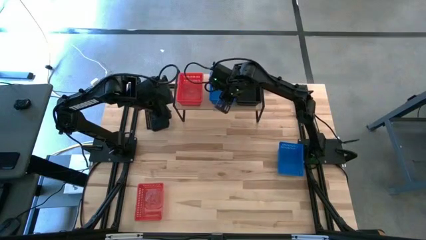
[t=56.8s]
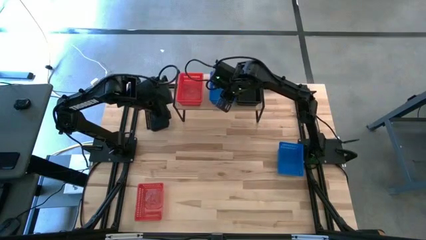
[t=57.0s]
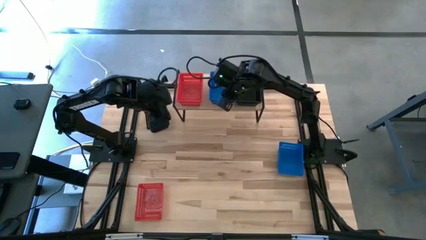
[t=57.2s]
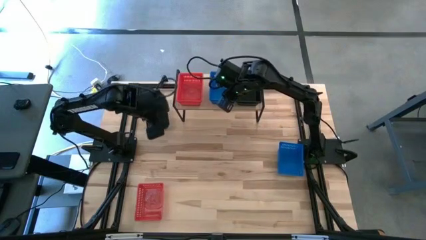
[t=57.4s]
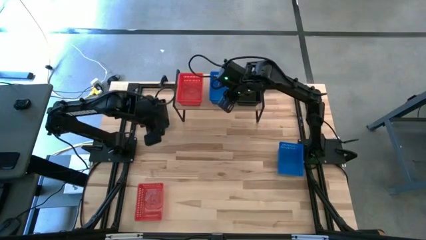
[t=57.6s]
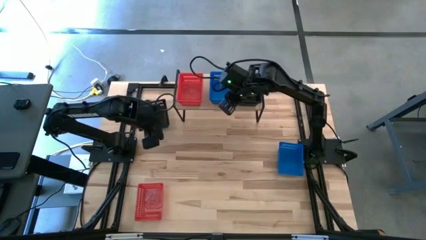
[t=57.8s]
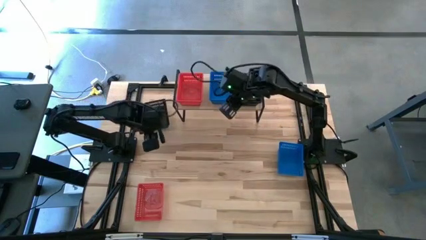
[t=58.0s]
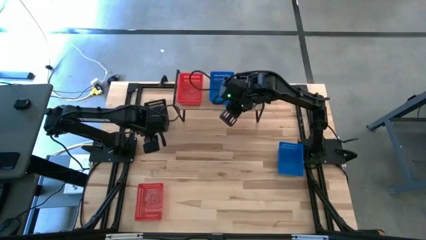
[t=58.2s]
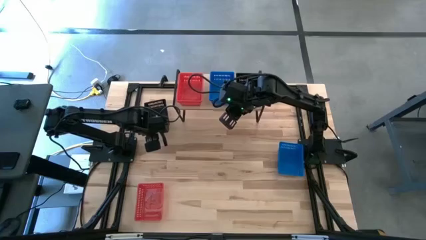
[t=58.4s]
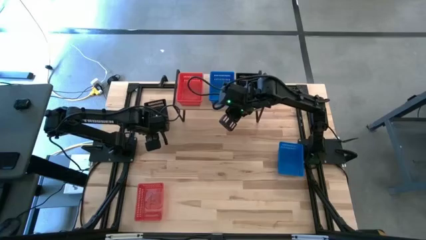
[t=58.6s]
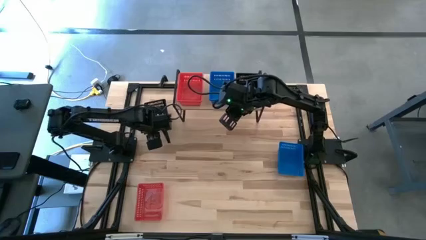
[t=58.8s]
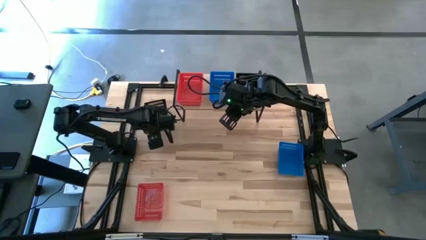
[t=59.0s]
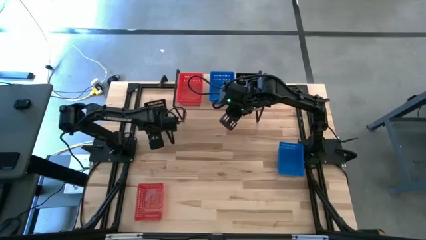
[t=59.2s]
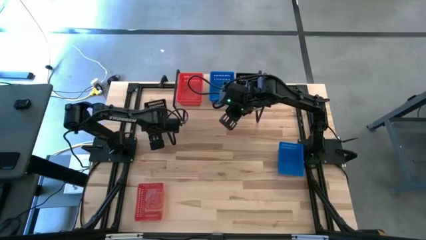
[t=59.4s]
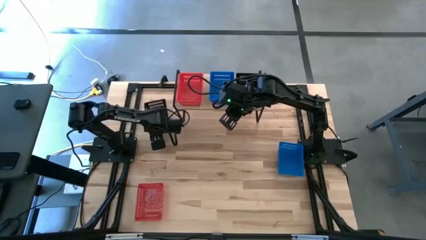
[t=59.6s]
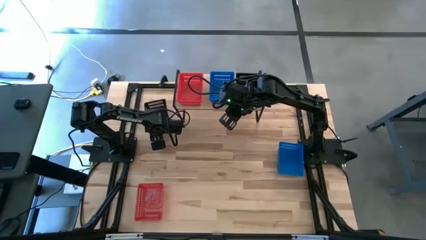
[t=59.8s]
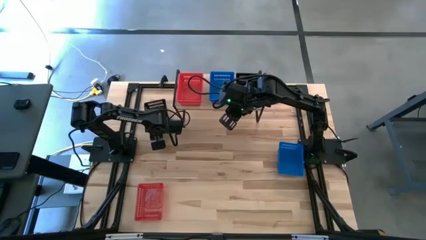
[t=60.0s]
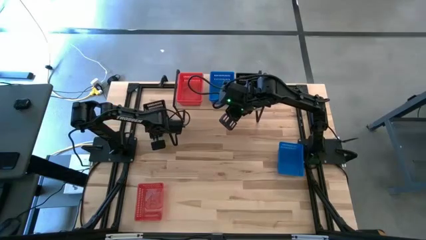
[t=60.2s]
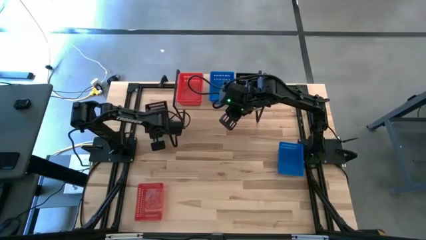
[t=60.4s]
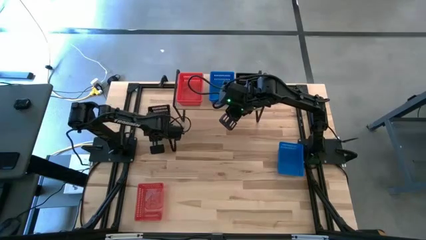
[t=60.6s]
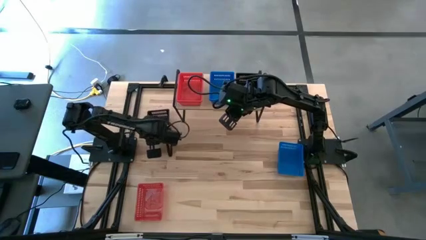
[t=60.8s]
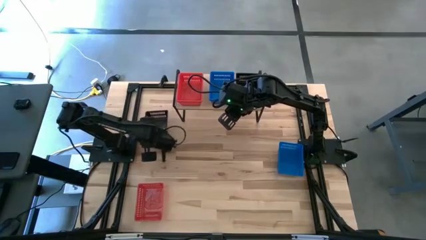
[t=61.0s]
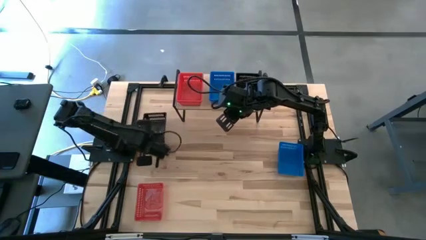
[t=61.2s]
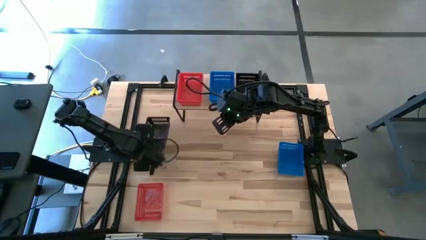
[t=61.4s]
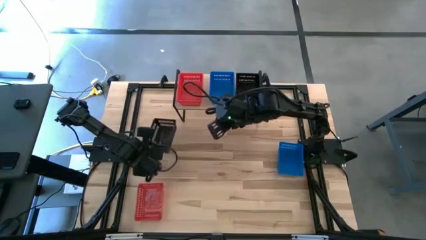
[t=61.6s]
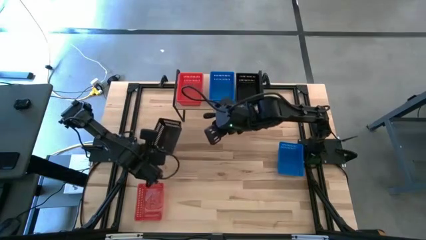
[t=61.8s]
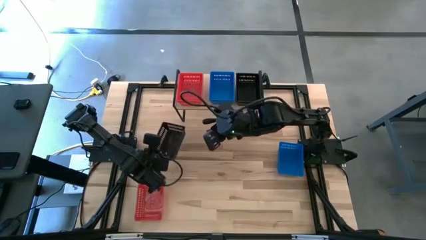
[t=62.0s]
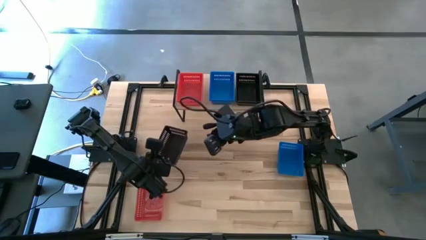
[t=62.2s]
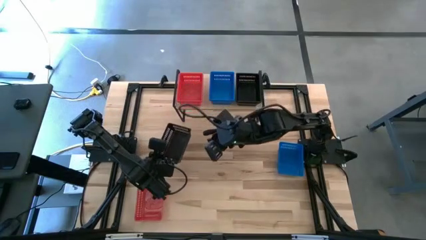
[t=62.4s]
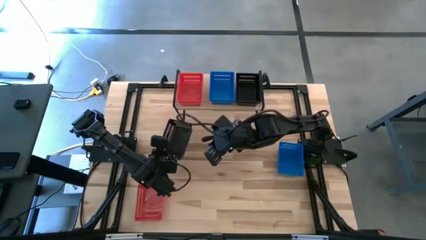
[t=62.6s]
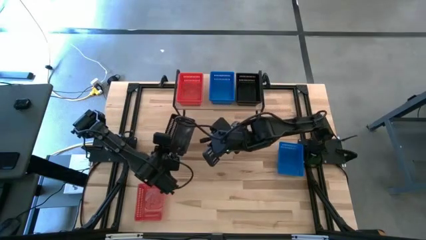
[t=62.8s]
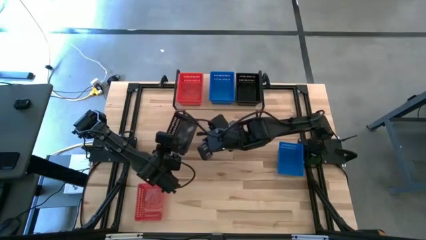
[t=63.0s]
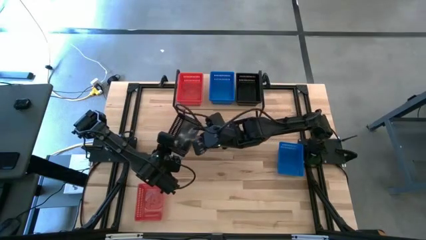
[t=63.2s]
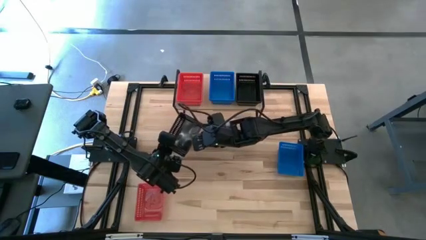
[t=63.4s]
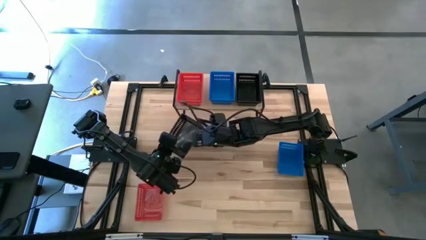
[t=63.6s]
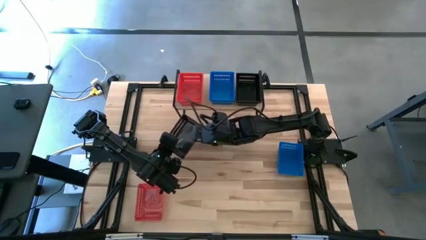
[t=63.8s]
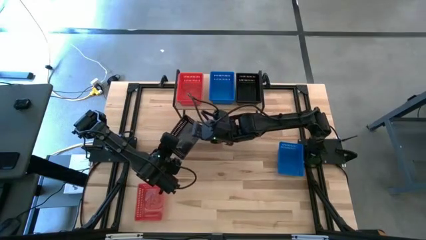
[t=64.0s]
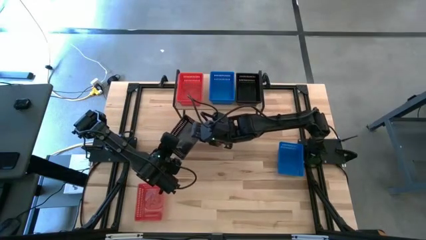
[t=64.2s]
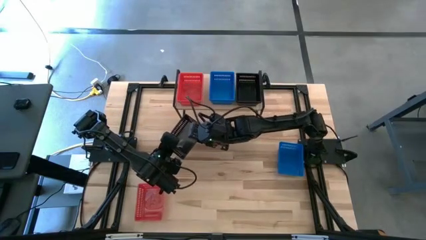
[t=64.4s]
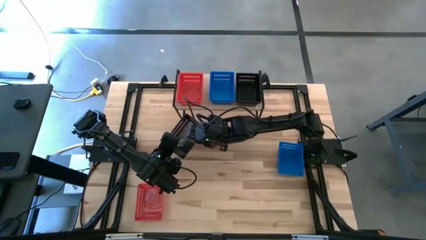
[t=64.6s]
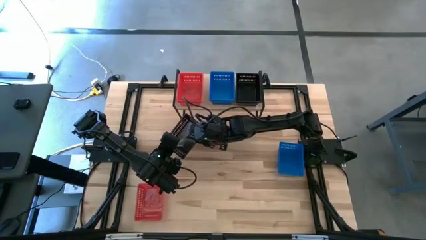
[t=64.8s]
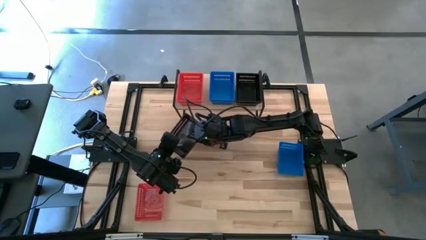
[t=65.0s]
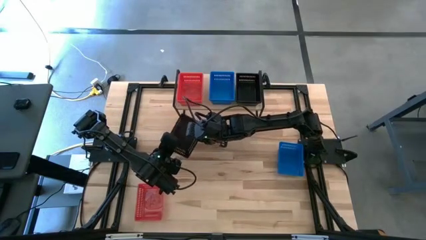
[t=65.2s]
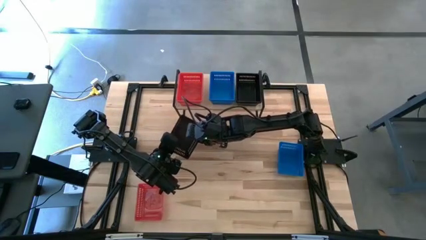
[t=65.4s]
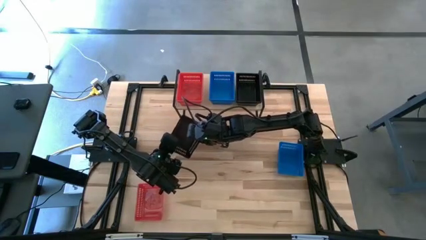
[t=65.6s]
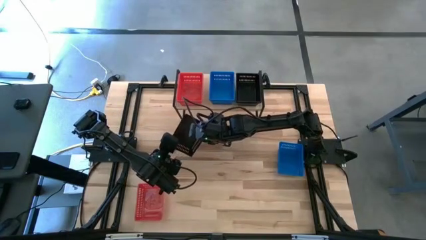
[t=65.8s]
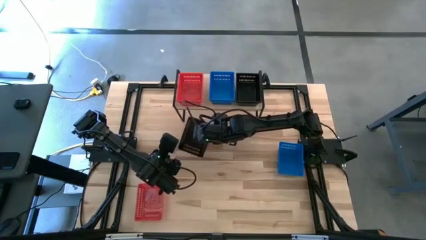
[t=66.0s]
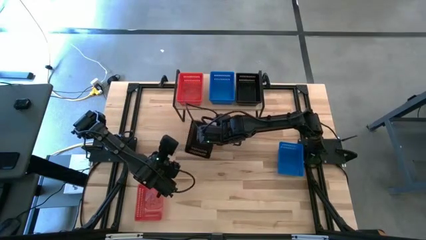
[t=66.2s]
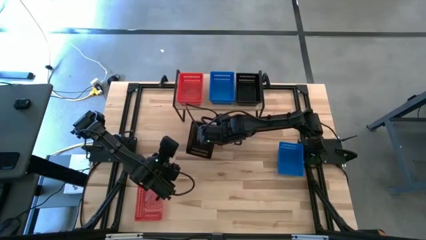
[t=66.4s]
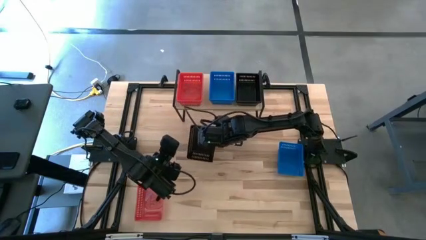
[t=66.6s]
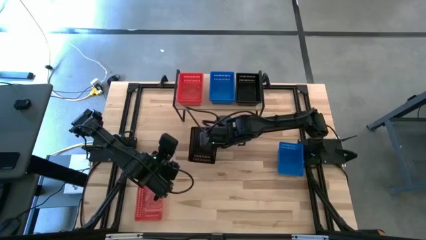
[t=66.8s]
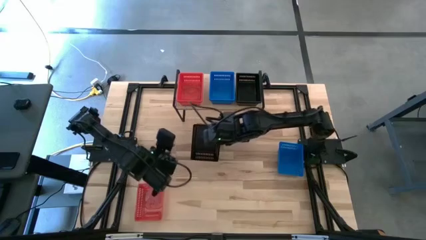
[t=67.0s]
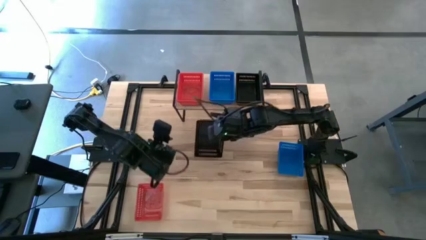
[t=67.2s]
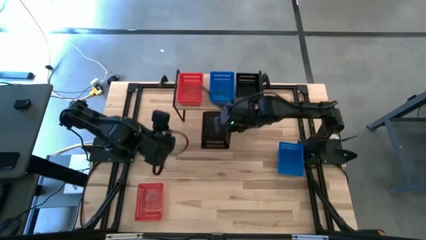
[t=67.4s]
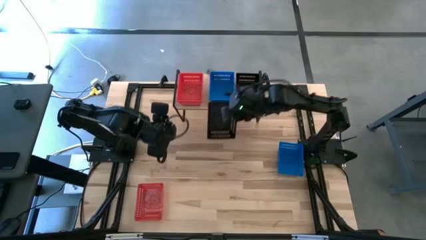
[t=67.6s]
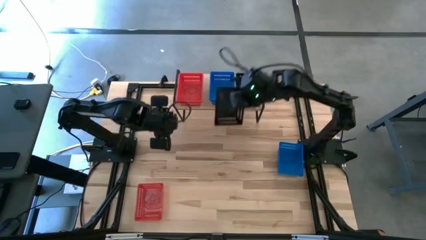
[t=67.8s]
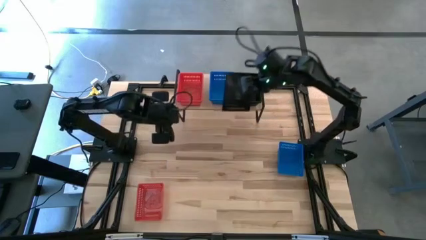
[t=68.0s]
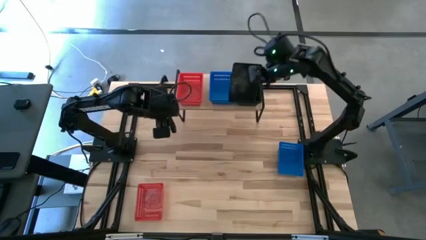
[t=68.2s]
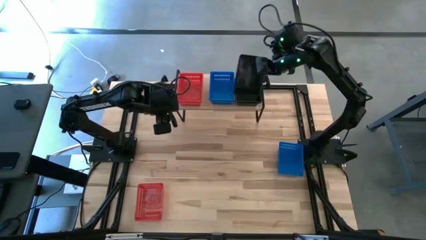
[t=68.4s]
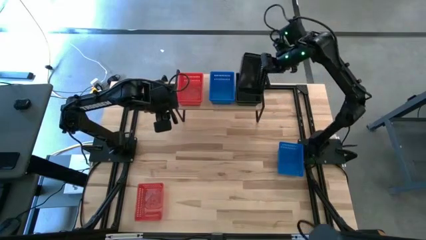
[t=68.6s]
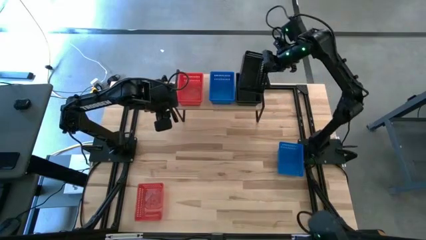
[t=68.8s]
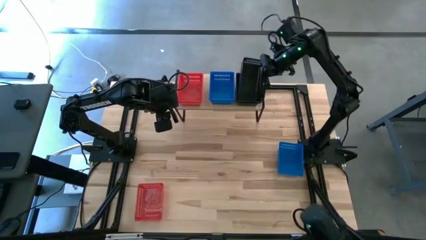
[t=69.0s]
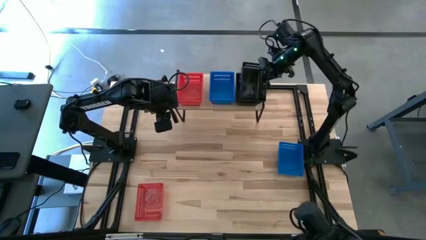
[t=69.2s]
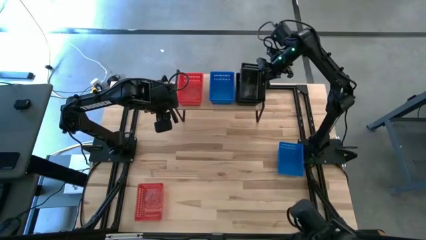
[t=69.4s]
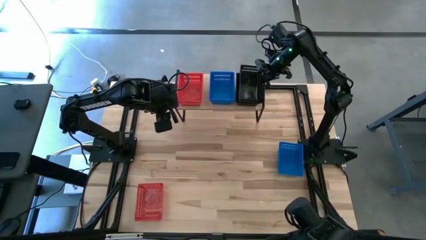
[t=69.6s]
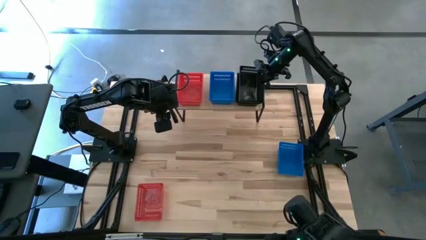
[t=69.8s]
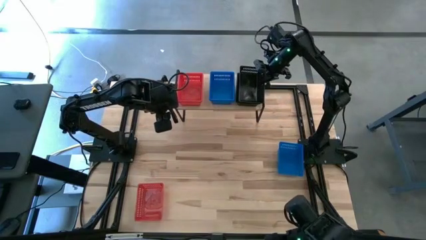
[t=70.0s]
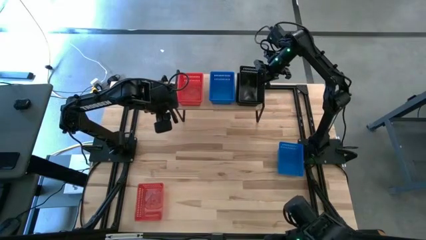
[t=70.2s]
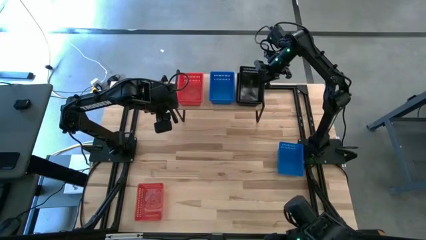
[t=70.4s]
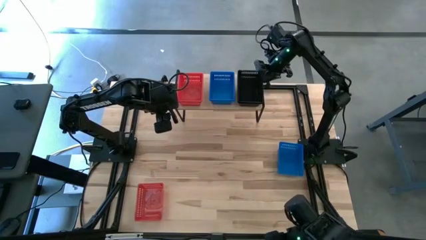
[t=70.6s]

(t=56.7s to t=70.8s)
Task: Stack baskets on shelf by color
Stack the black basket on top of the black basket on the shelf

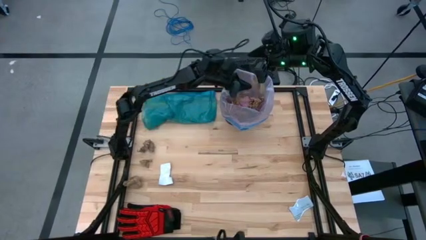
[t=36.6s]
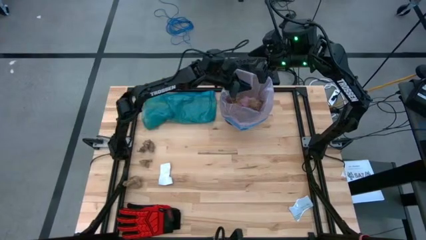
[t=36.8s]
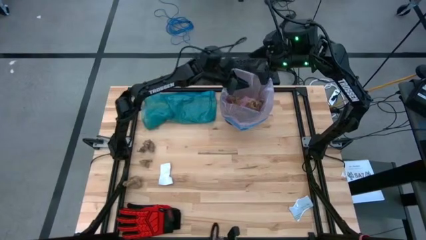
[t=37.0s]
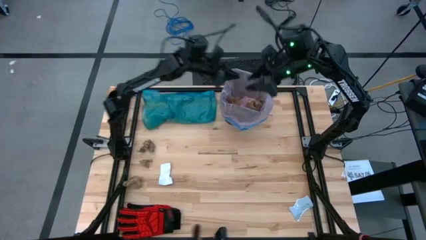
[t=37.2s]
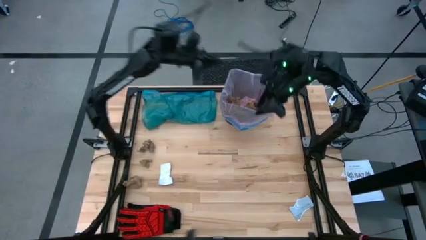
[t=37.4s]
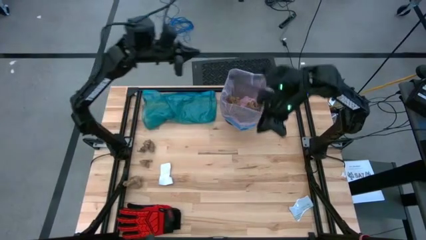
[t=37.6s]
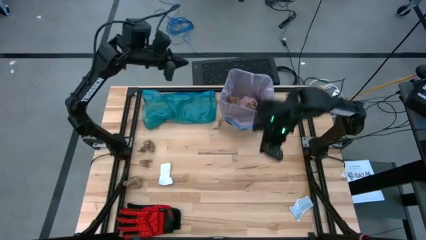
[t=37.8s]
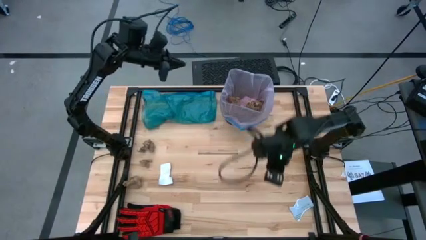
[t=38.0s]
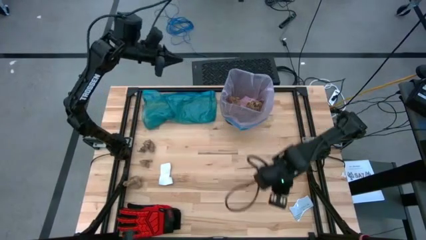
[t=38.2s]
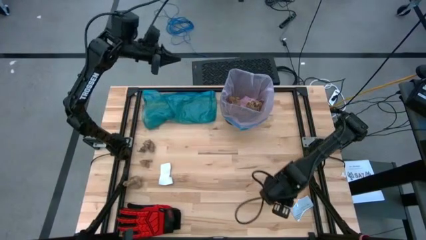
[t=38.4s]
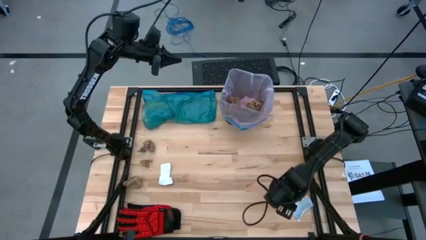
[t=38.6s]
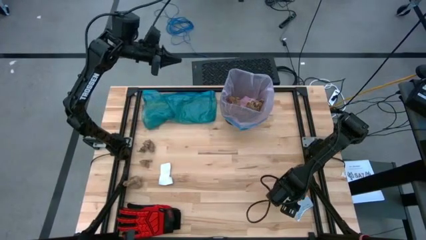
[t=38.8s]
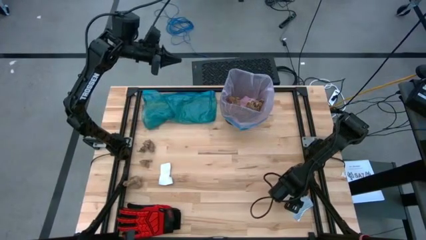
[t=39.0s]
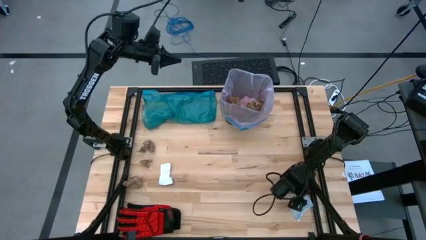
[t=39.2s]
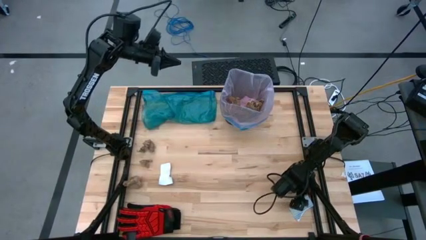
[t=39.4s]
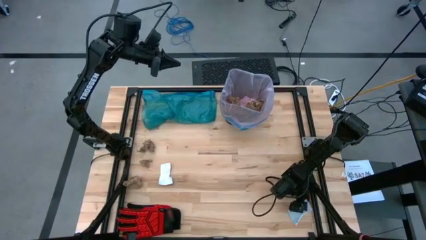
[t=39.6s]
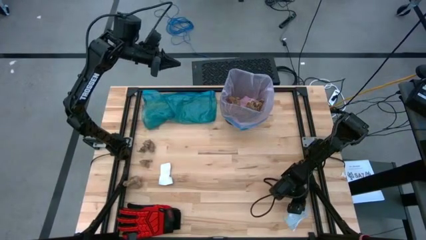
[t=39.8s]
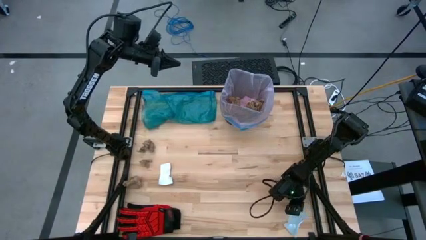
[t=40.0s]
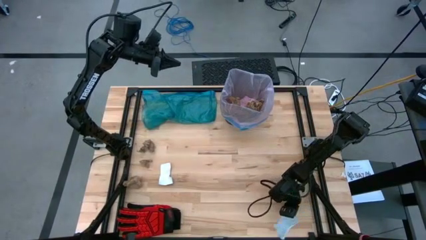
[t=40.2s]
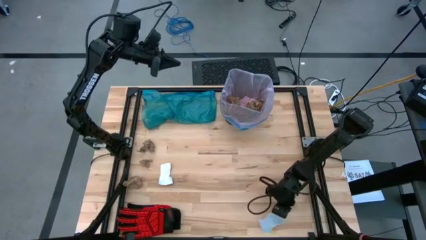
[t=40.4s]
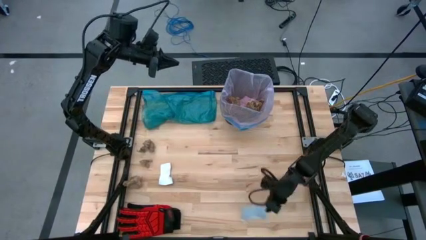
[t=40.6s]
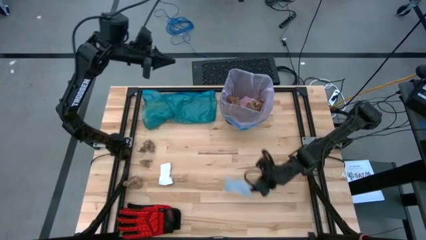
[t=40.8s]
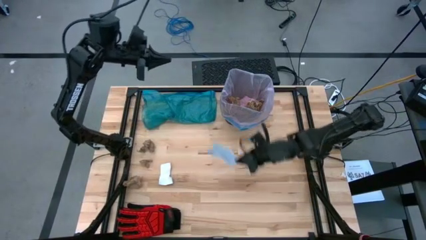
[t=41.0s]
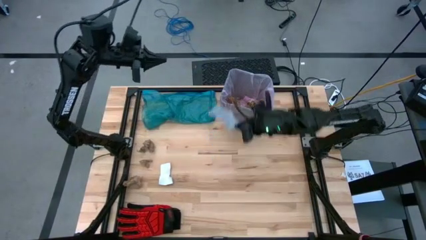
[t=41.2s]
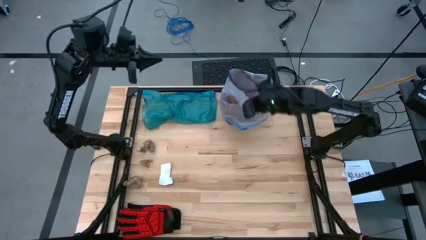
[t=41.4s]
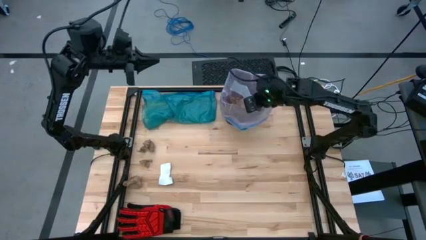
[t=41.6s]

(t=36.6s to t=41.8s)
Task: place trash/remove bag and relplace
Put the white paper into the black trash bin
